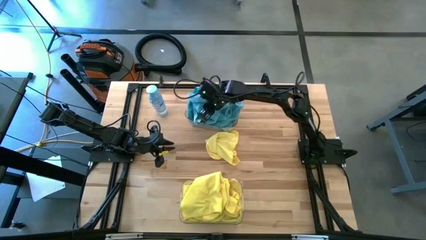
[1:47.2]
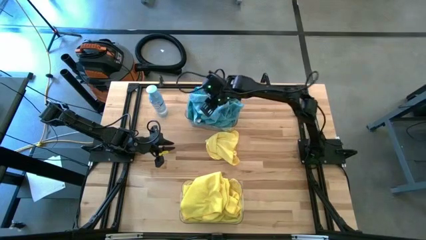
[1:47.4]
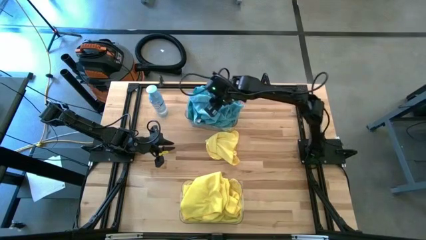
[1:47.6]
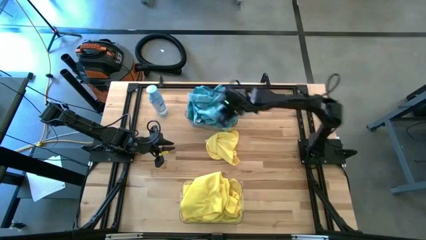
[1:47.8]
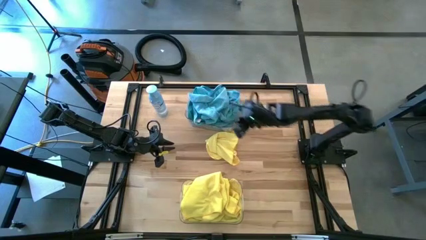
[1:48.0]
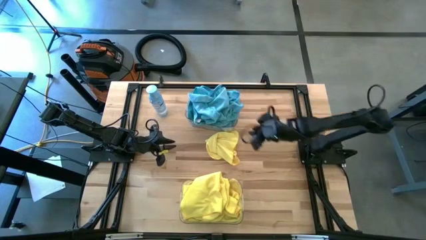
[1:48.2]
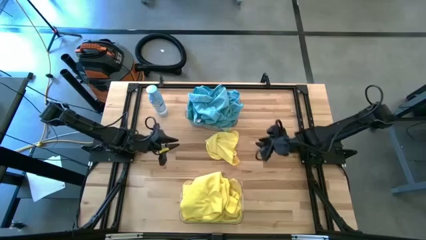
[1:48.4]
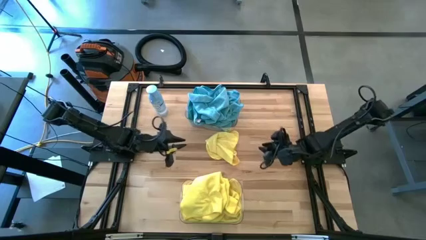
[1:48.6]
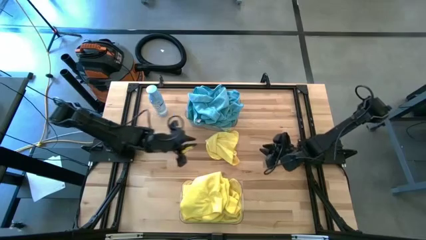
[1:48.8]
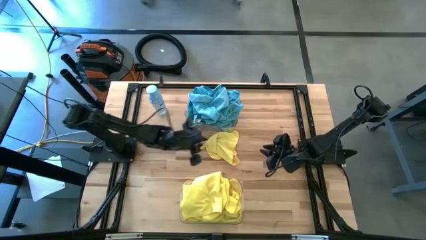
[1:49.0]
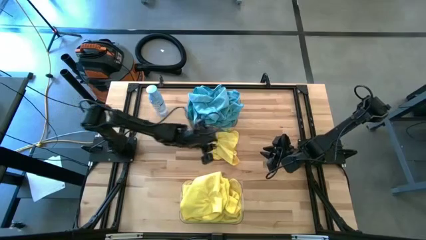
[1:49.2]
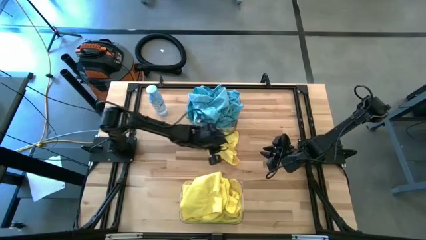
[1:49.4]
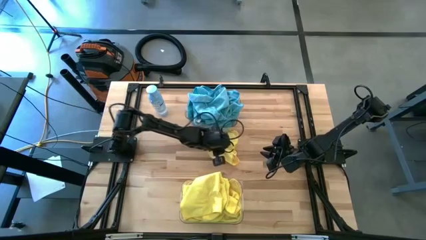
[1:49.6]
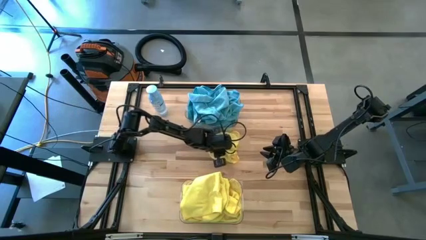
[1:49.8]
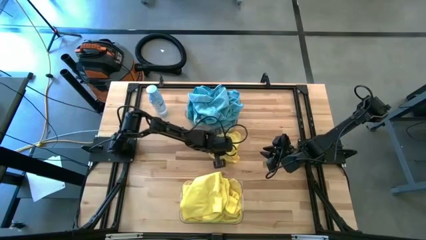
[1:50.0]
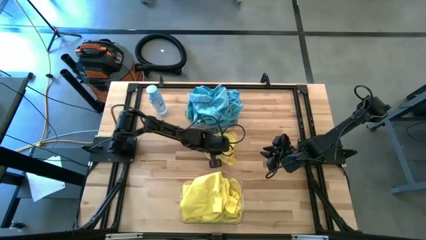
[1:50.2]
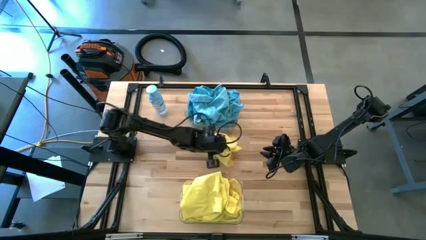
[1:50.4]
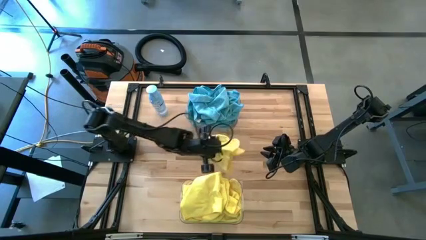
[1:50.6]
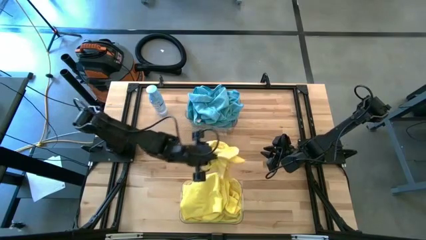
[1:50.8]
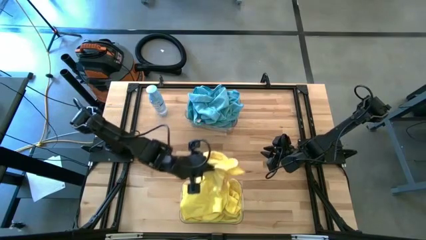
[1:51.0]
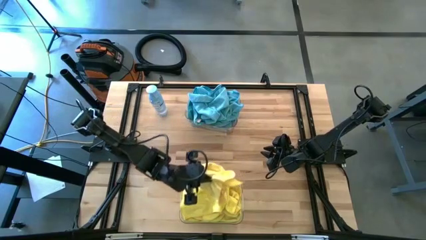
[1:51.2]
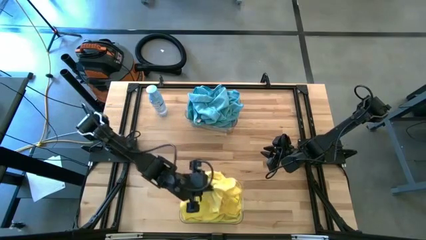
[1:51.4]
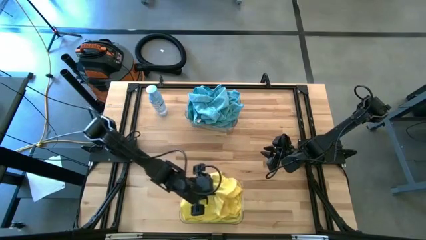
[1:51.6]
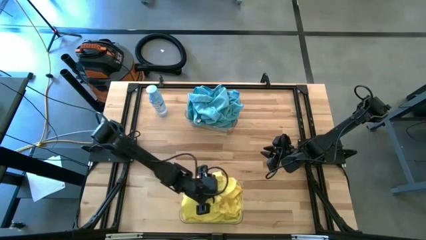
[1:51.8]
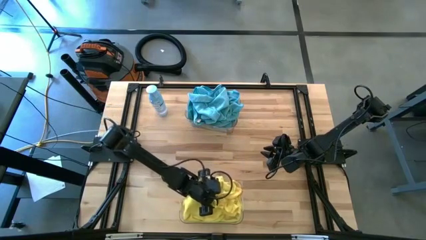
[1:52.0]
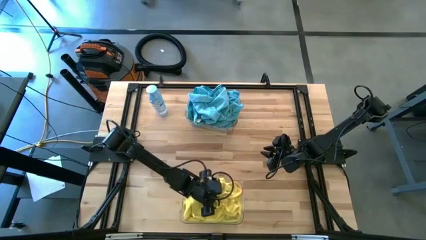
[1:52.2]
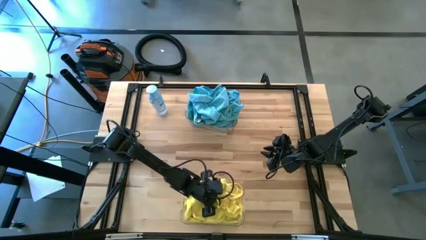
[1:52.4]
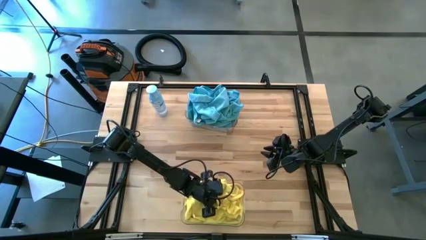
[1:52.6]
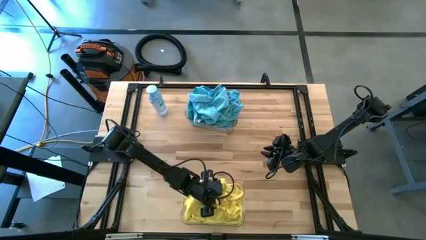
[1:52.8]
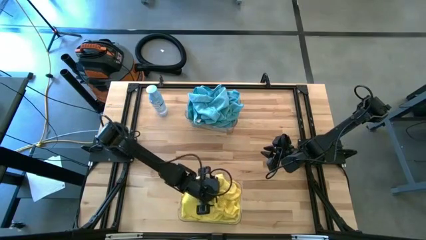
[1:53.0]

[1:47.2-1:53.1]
Task: Sort microfiber towel by color & place in baskets
Put the yellow towel into the bottom transparent bin

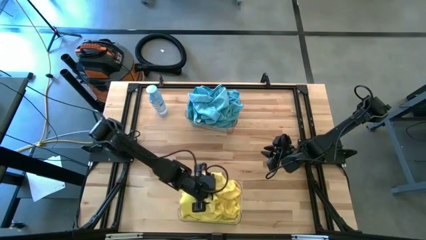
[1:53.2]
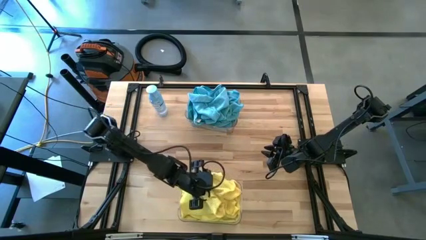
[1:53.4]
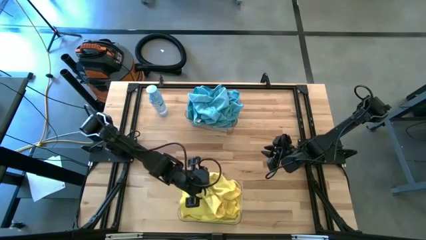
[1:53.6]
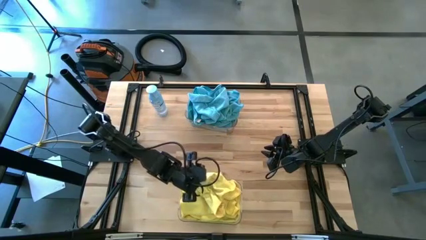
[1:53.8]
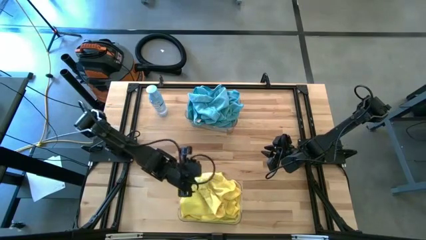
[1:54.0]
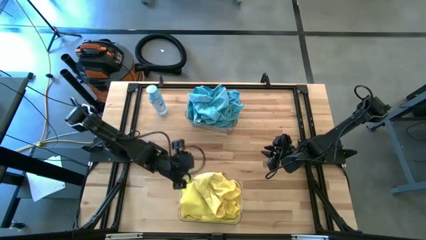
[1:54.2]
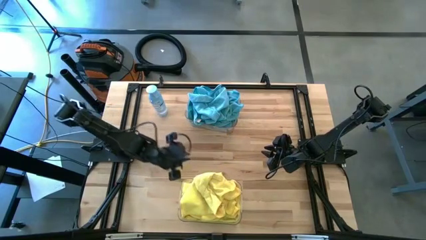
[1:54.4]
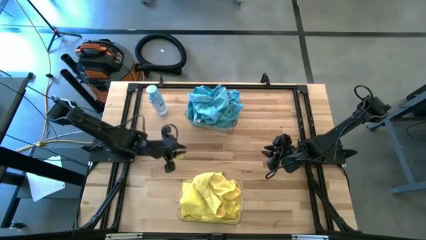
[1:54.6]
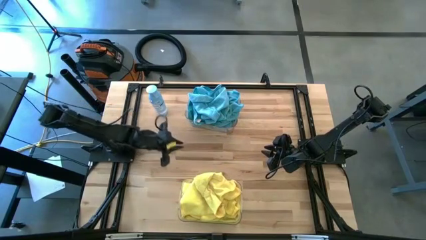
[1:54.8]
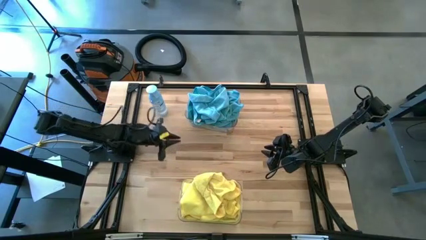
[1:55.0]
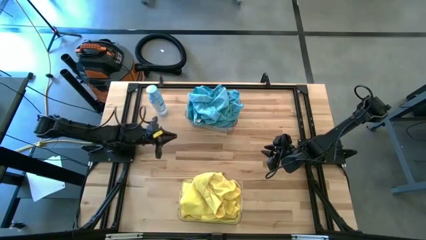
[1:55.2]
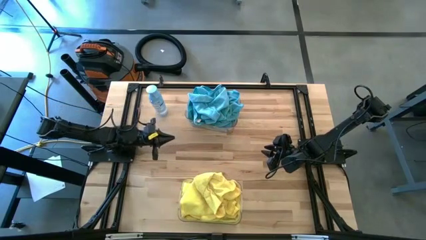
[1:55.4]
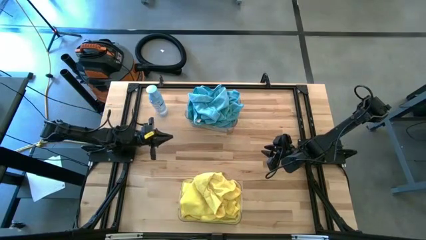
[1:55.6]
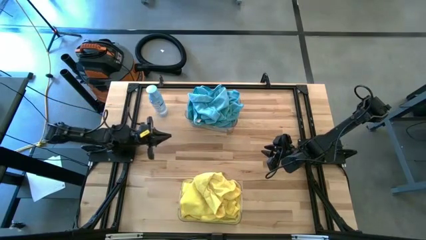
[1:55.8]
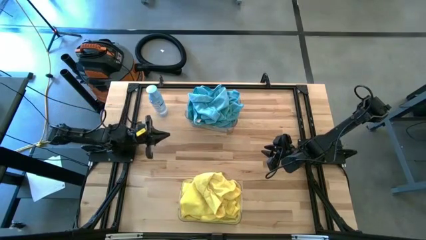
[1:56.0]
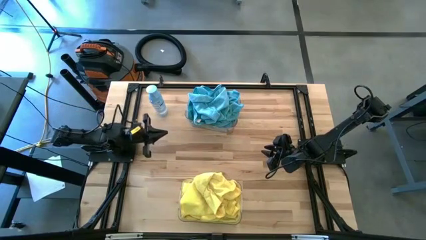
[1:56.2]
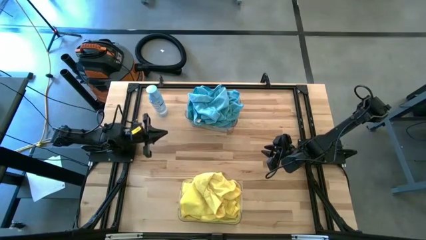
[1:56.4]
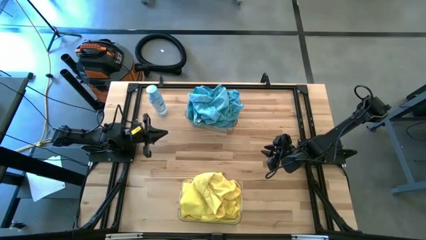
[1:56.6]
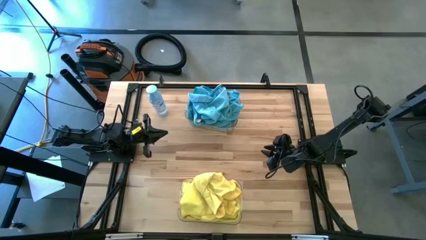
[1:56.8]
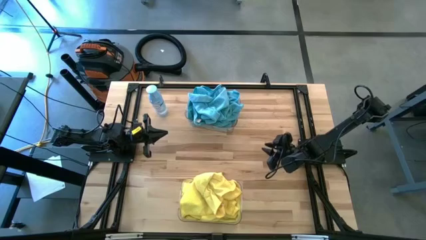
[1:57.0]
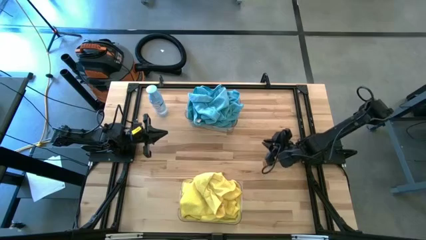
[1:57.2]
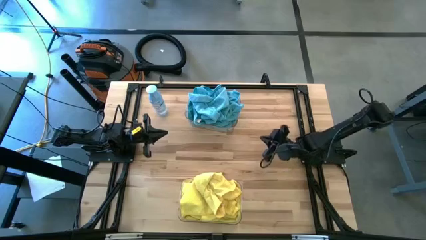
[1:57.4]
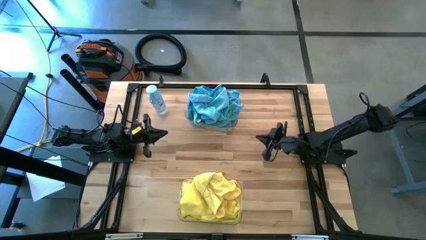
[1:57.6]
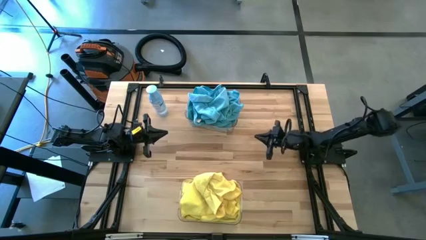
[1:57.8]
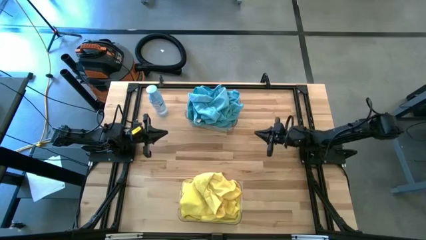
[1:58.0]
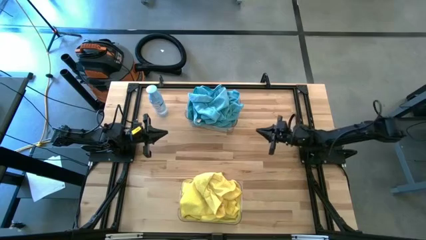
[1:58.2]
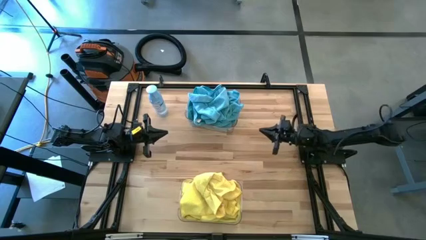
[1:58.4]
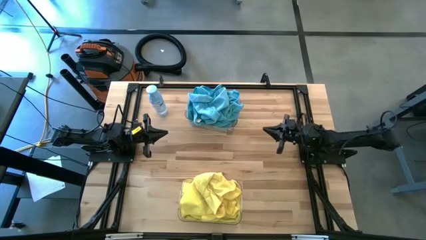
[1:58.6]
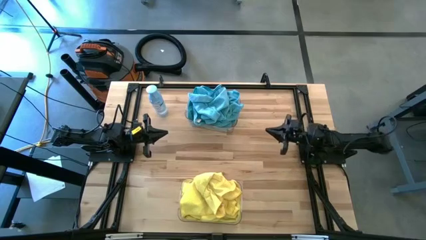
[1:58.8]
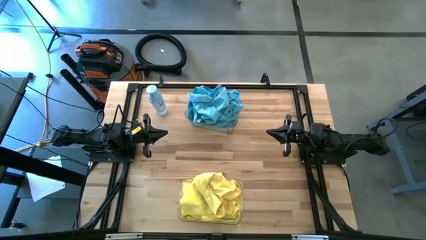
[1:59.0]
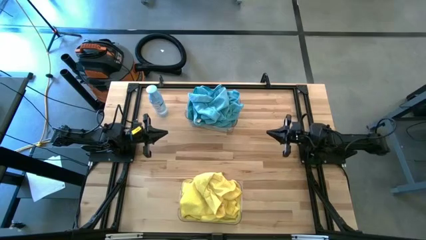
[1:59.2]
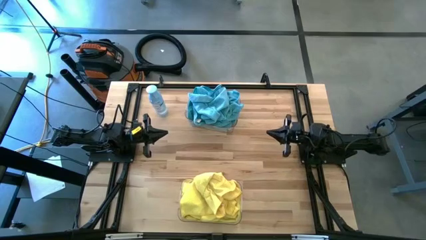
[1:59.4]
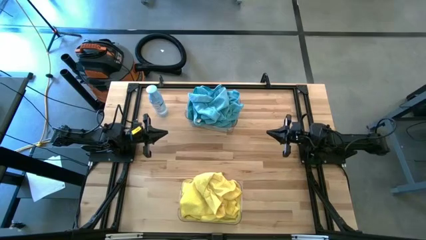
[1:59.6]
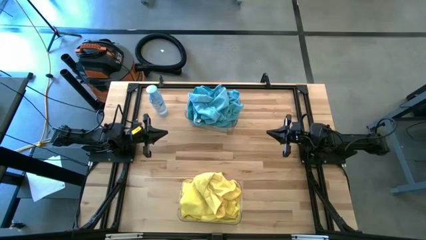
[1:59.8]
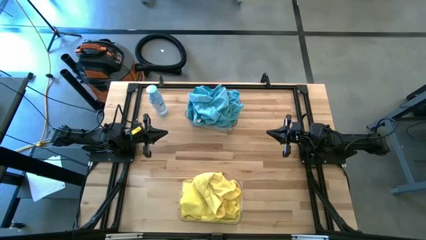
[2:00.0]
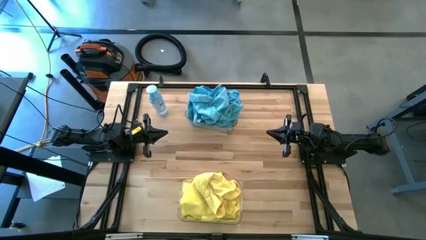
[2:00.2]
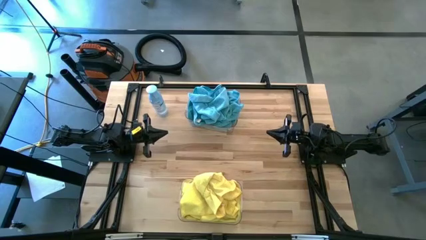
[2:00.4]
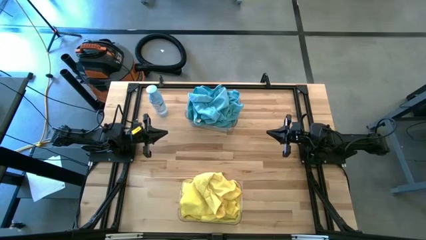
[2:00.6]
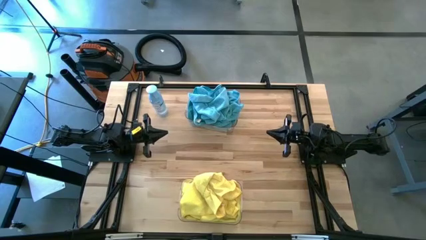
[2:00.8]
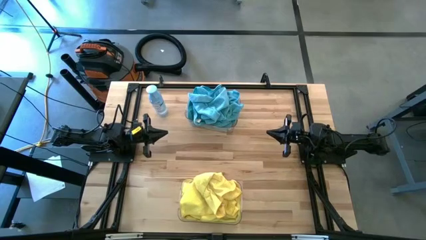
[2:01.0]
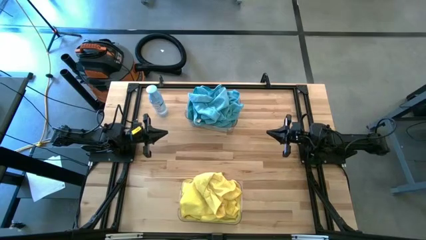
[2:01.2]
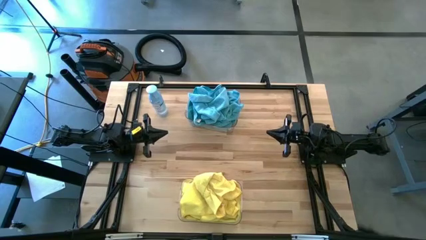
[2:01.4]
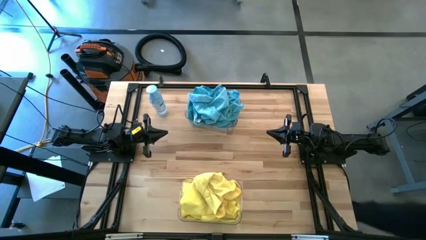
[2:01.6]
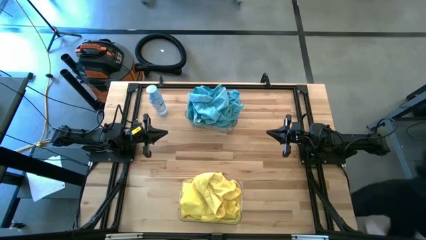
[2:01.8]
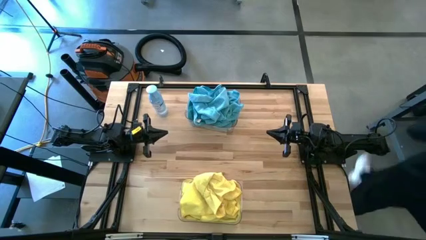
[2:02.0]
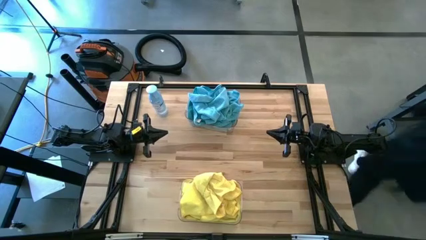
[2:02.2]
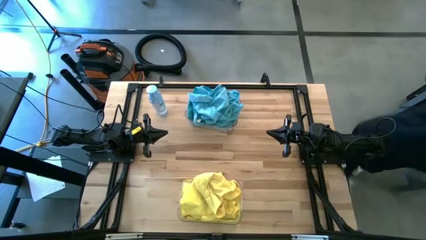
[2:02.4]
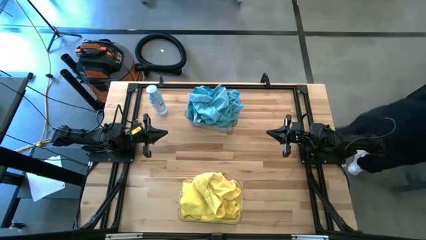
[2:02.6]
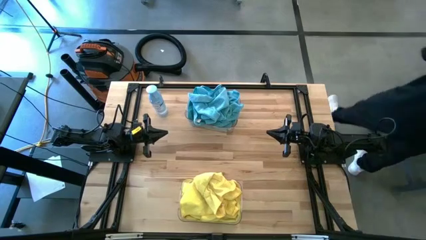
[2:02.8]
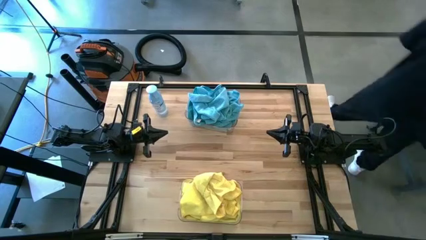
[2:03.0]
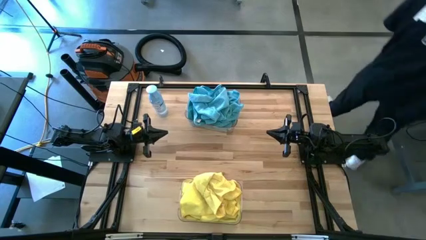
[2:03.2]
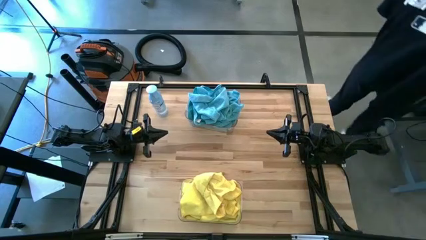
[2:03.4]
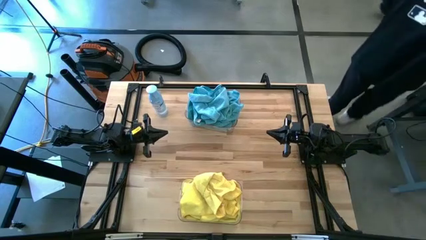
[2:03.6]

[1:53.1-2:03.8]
Return to Home Position
